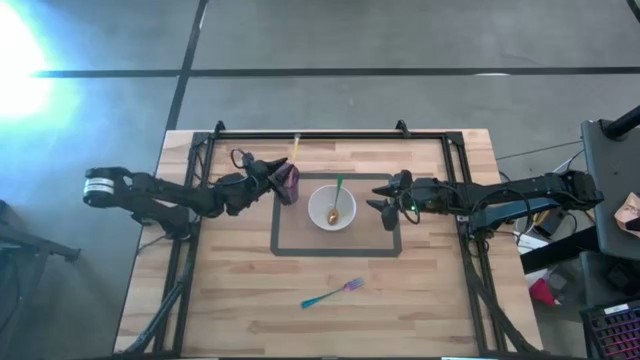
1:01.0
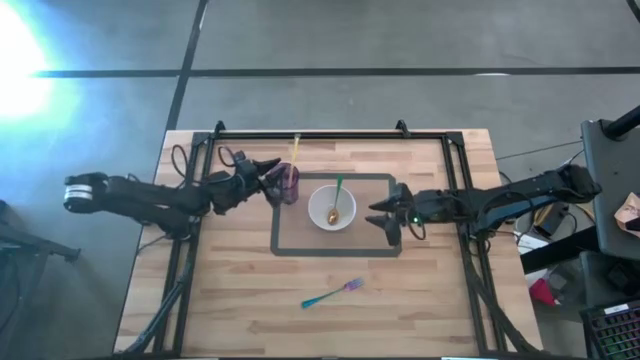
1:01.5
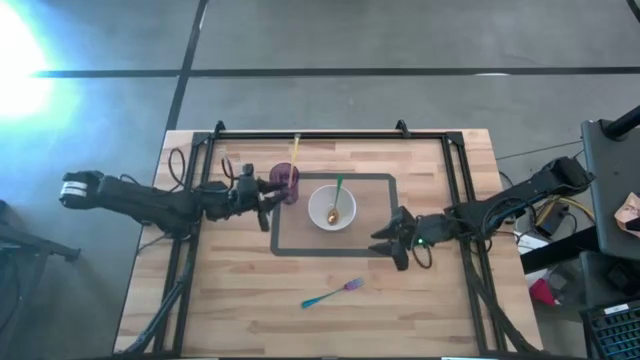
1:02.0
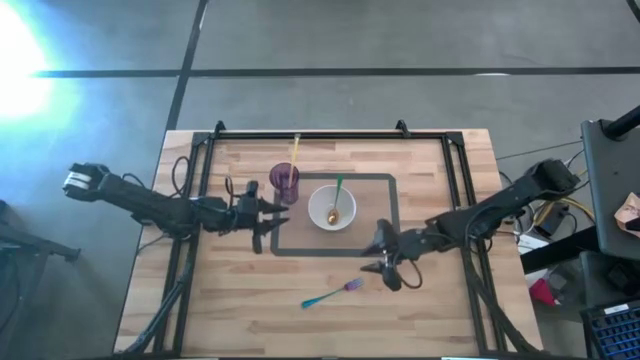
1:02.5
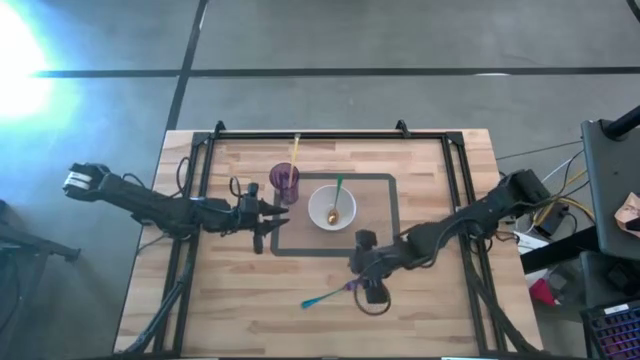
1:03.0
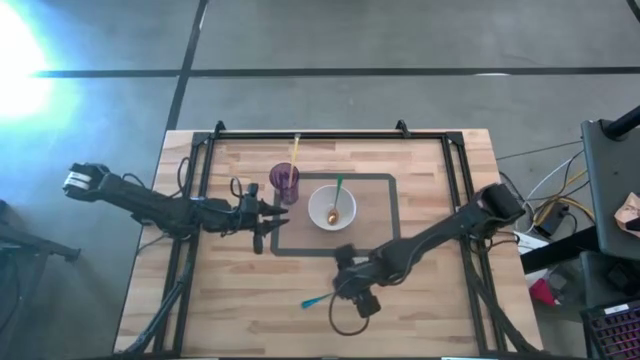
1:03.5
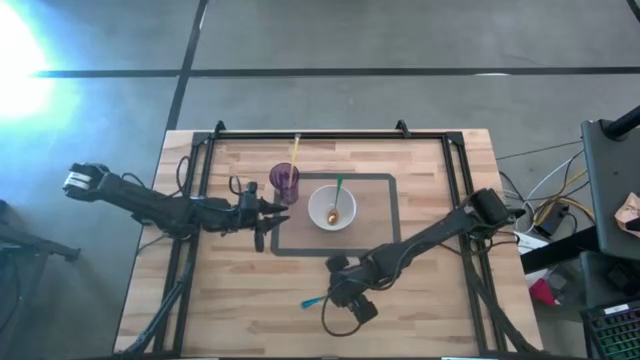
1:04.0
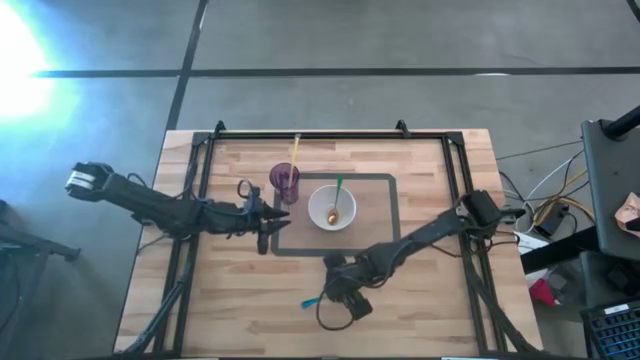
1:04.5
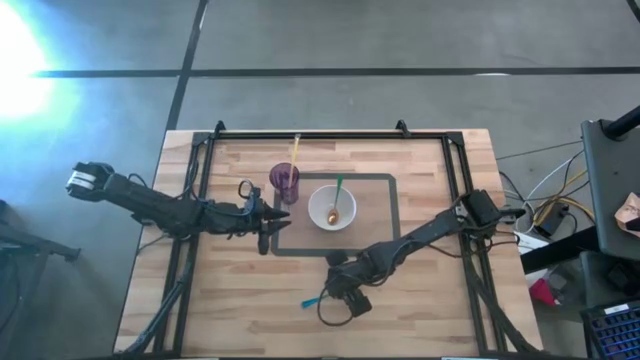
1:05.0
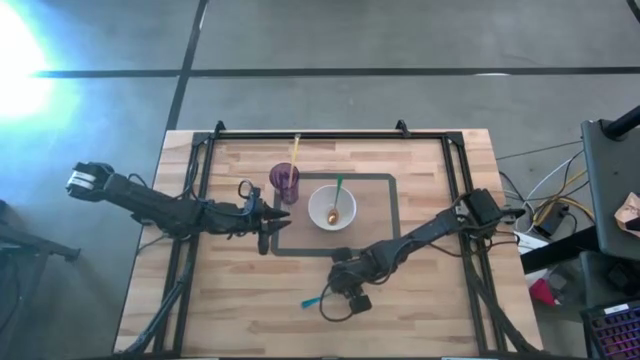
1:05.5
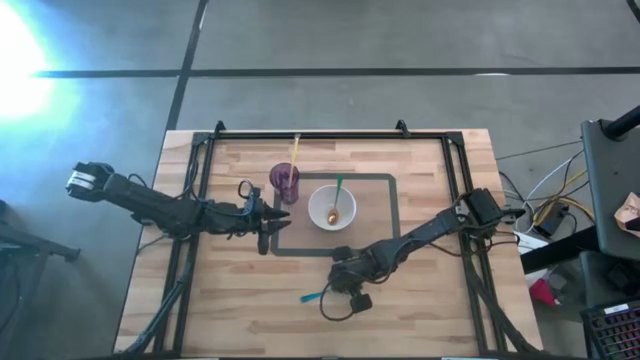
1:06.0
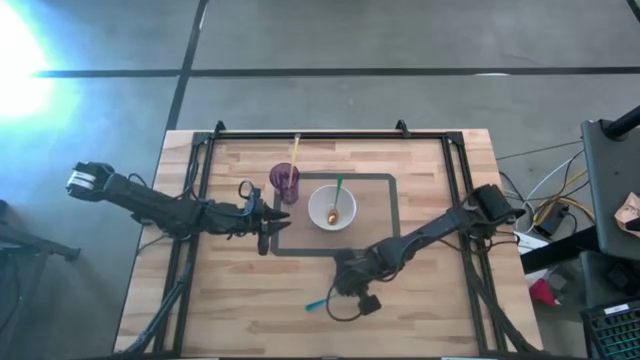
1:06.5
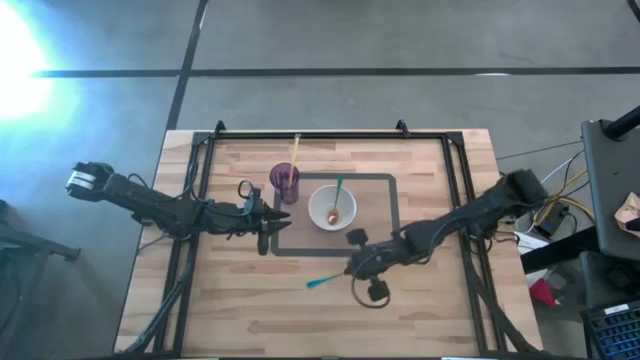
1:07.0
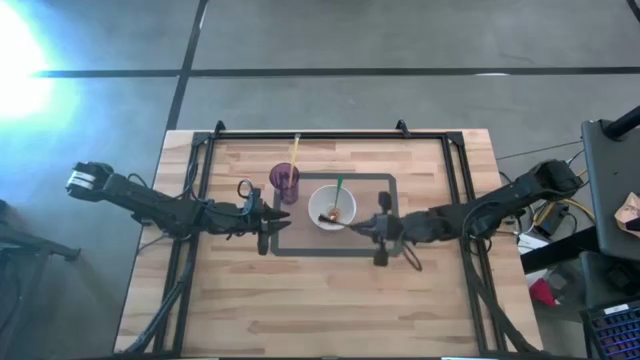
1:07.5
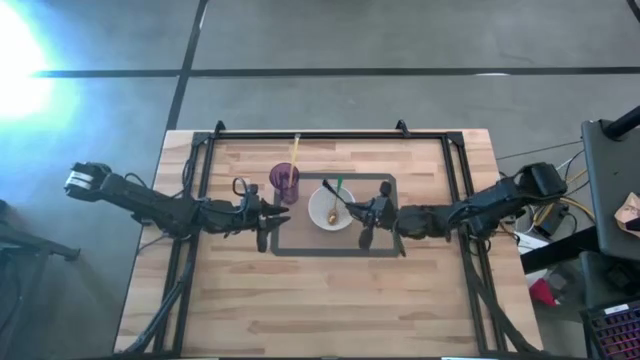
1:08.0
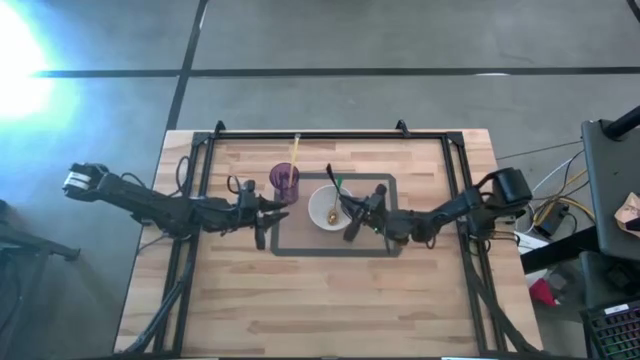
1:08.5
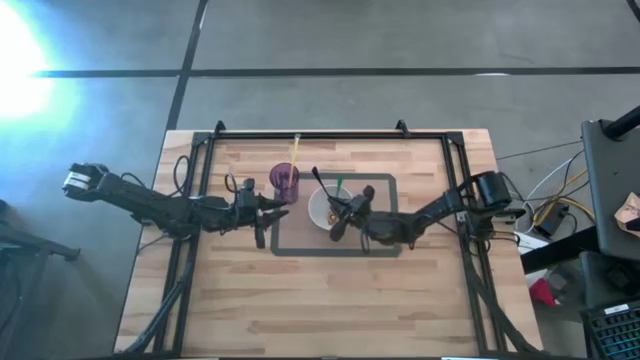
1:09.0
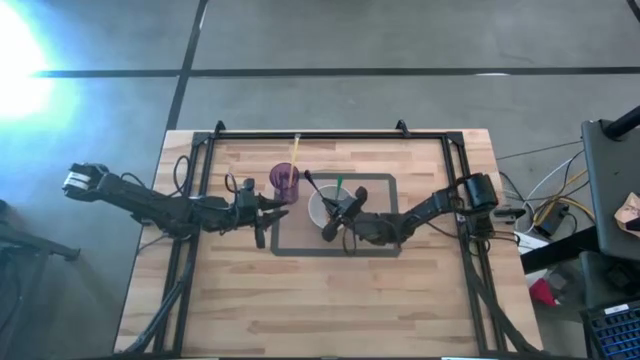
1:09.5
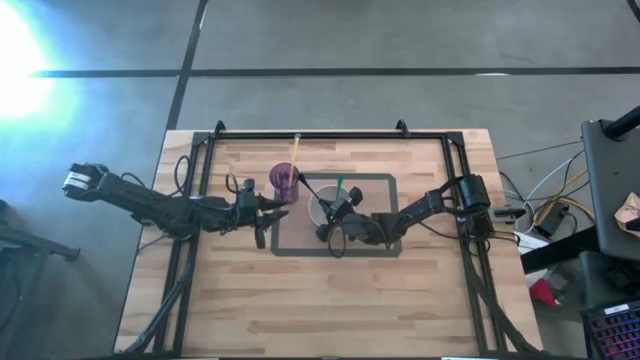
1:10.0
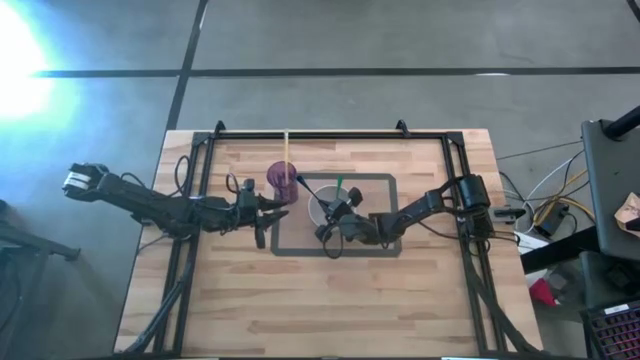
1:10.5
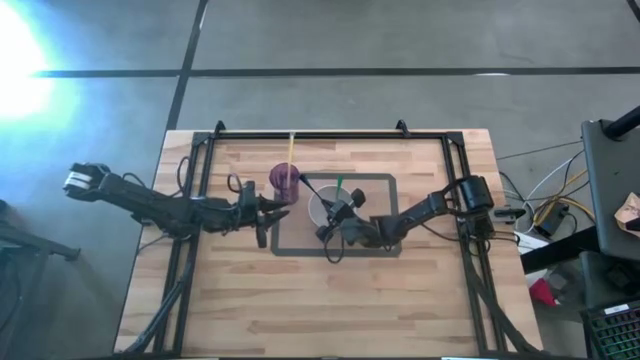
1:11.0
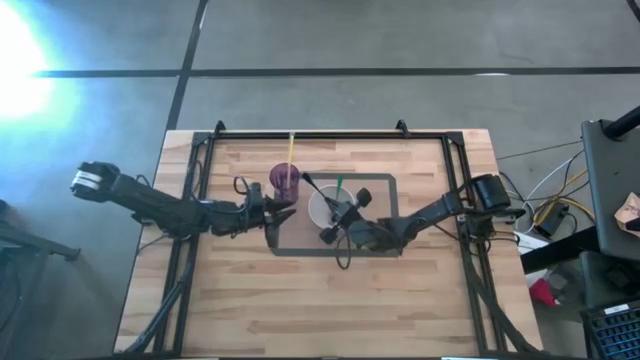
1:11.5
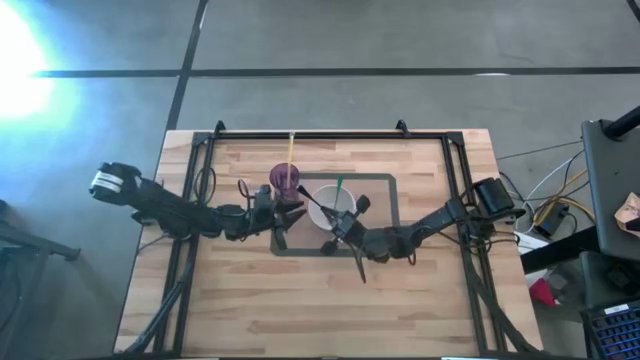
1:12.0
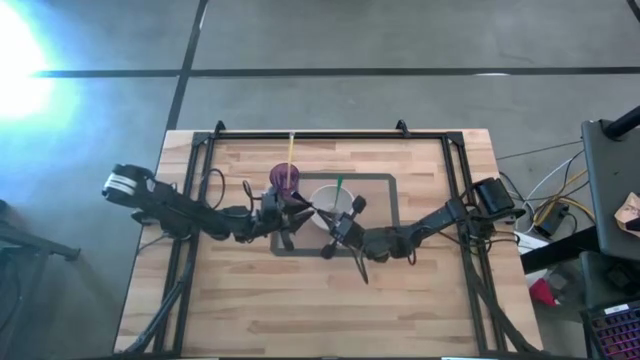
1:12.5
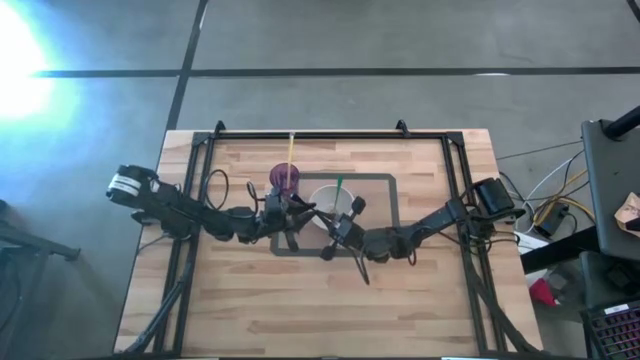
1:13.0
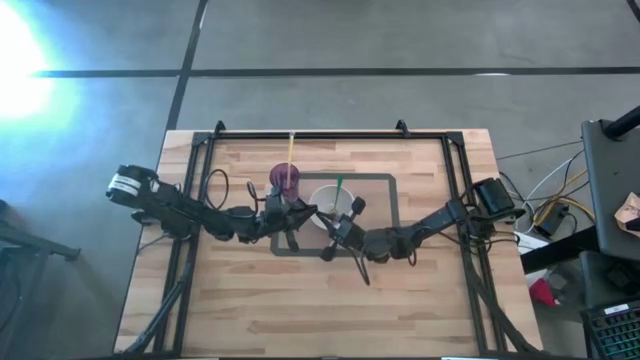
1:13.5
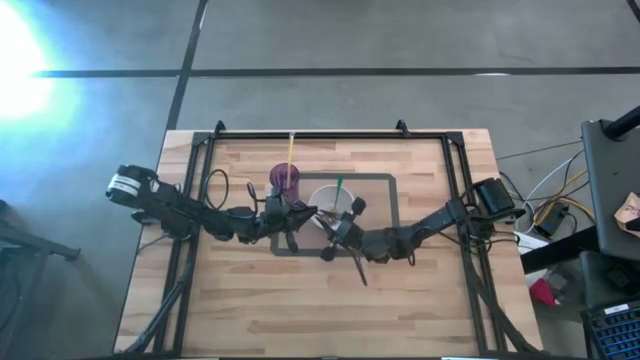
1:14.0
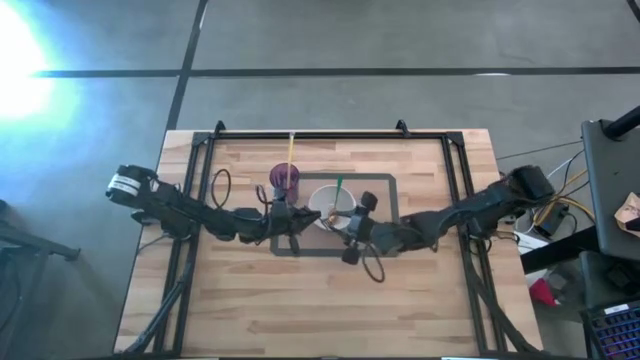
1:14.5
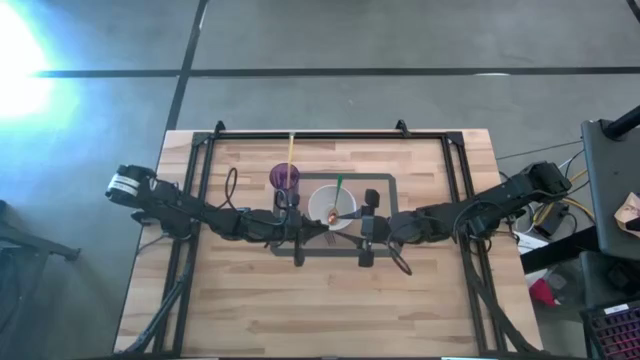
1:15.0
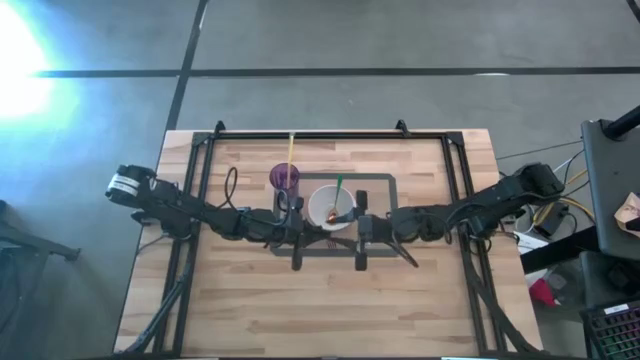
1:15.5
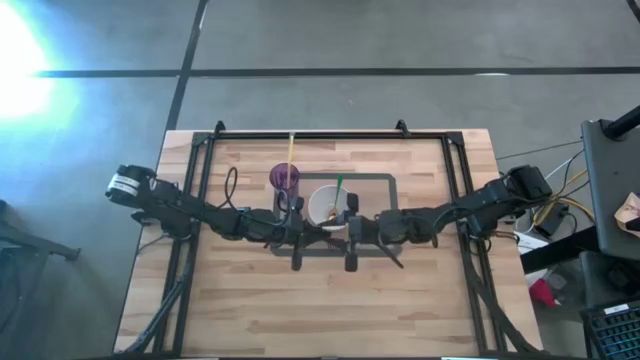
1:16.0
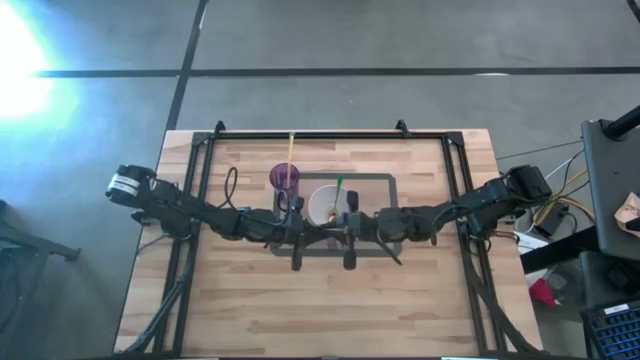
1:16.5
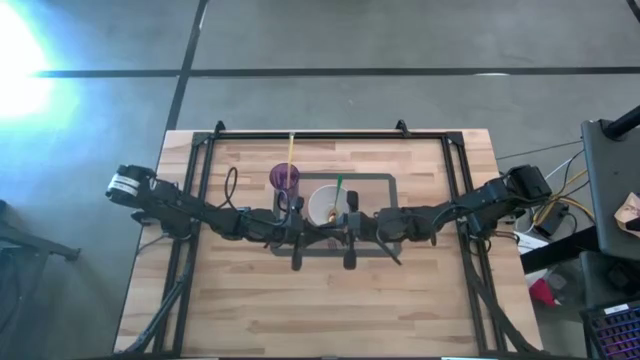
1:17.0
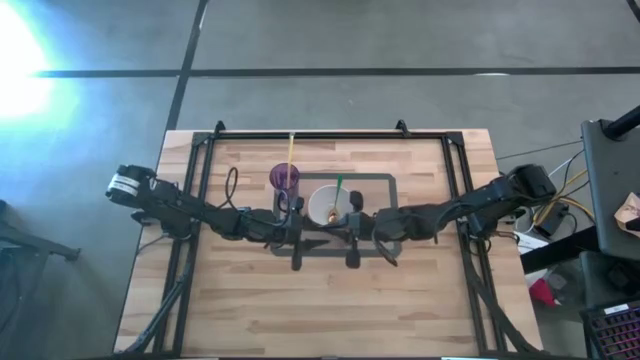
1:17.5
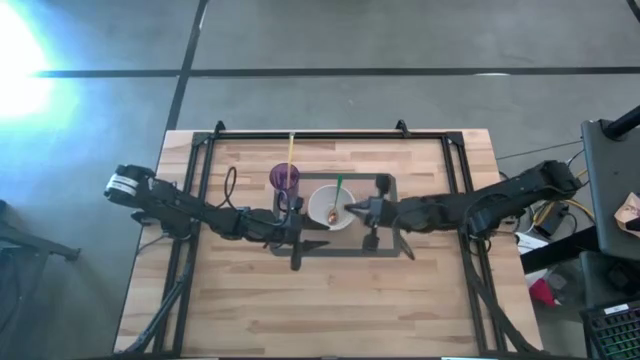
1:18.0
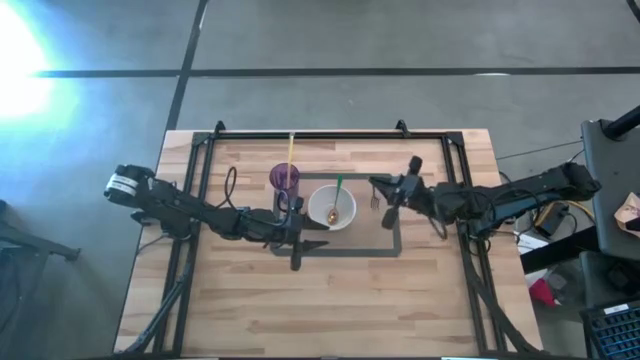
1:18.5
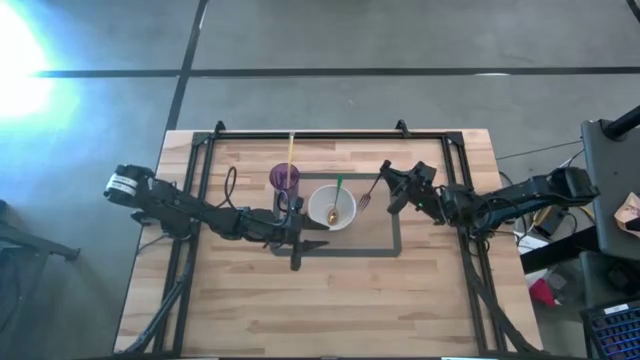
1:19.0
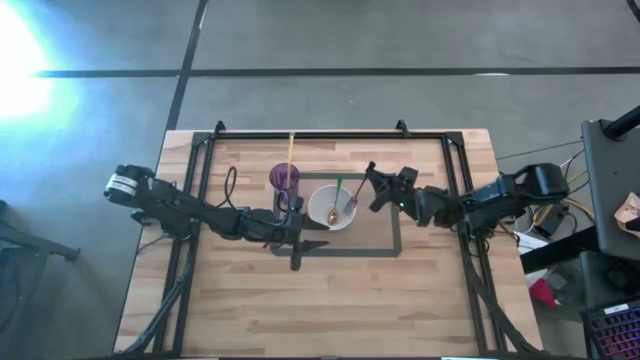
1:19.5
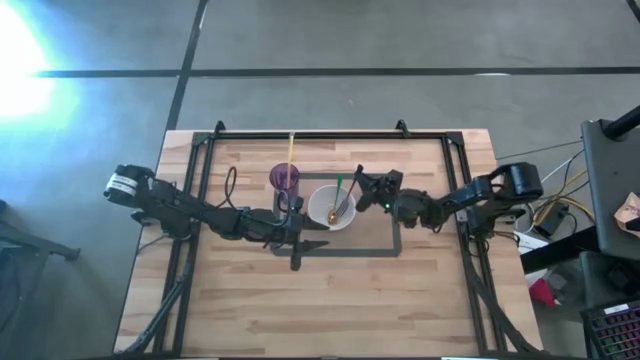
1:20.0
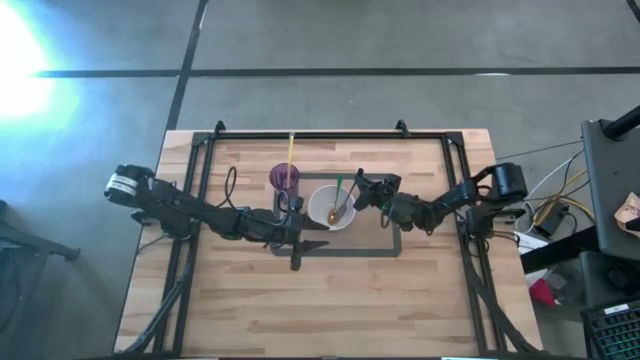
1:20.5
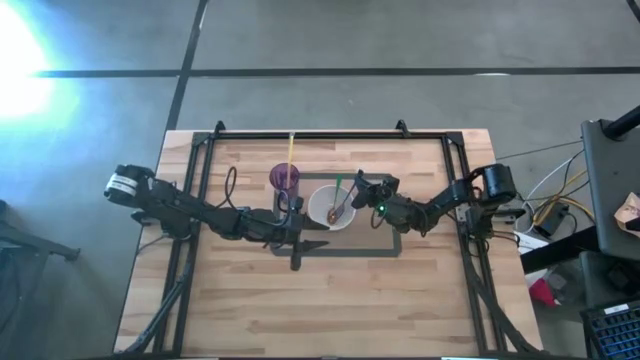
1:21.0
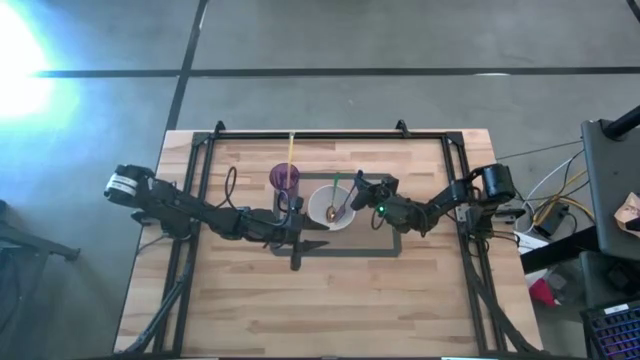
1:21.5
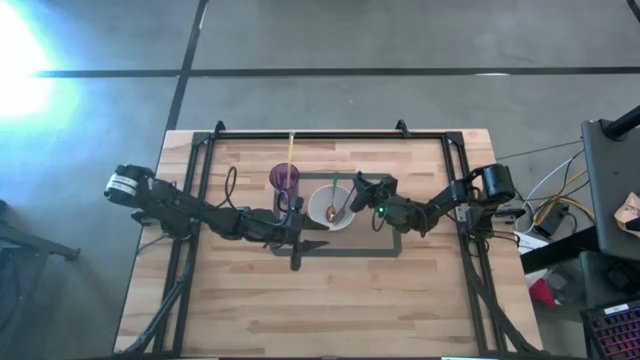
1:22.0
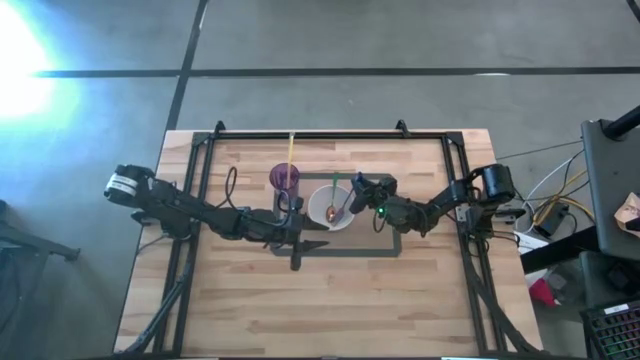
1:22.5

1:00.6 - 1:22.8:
Task: Pick & Place Utensil
Put the blue fork into the white bowl on the brown placemat
